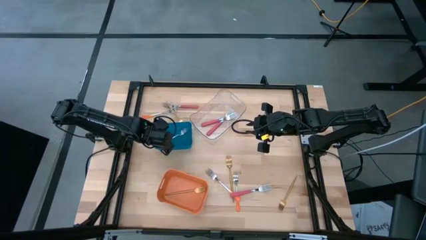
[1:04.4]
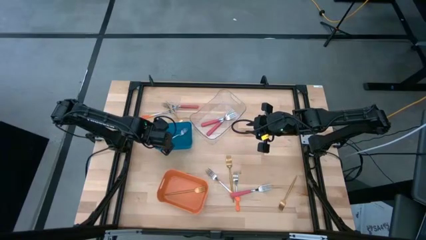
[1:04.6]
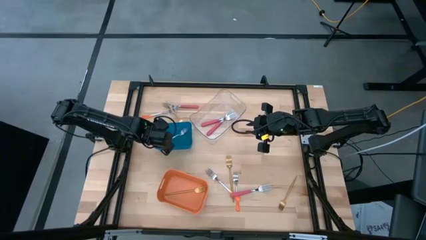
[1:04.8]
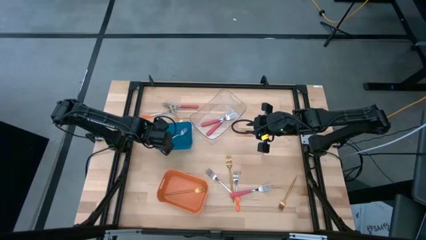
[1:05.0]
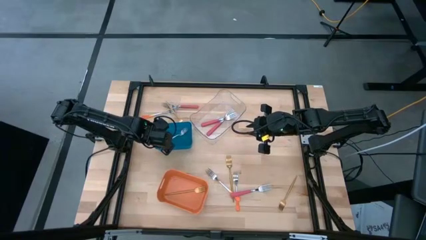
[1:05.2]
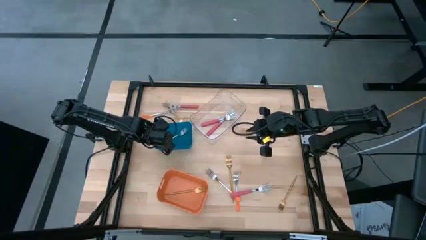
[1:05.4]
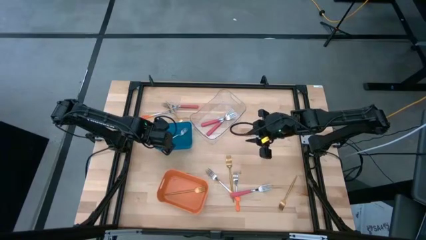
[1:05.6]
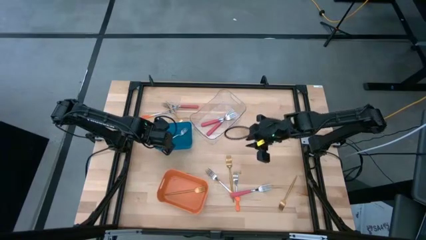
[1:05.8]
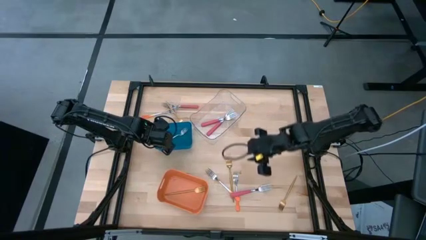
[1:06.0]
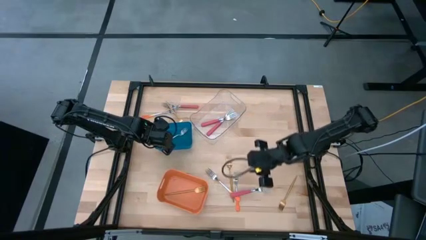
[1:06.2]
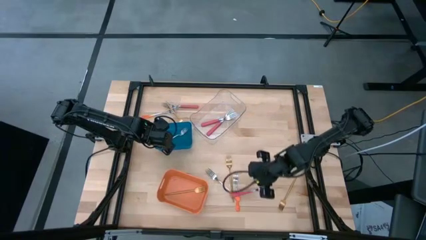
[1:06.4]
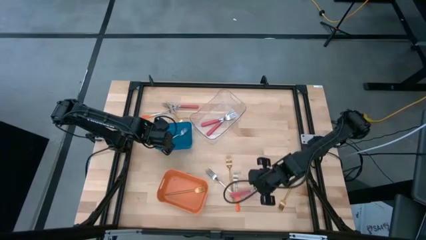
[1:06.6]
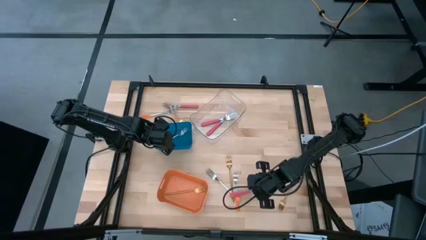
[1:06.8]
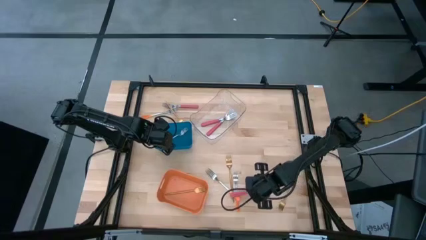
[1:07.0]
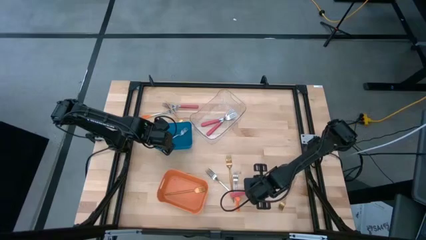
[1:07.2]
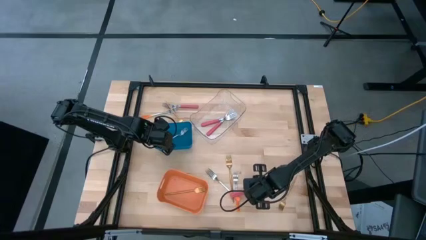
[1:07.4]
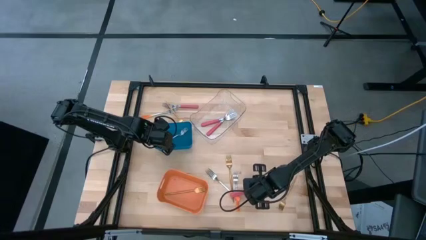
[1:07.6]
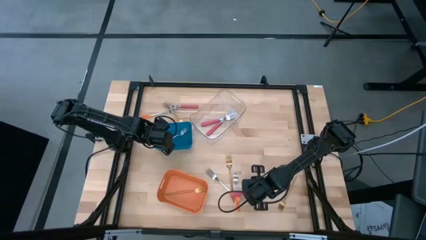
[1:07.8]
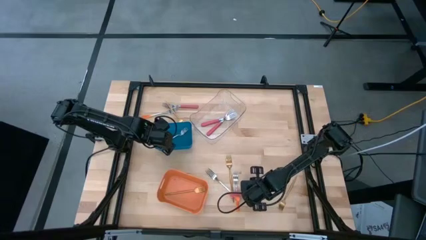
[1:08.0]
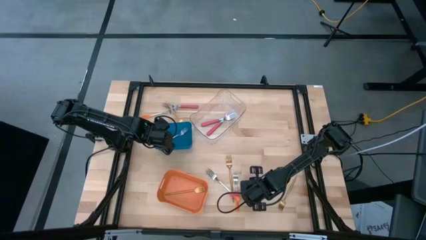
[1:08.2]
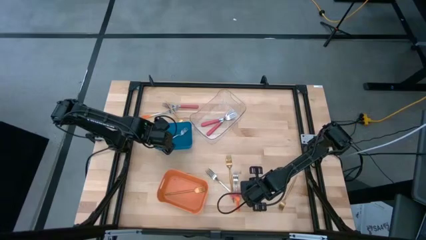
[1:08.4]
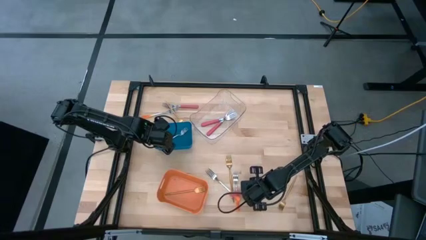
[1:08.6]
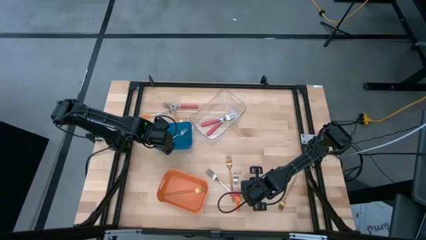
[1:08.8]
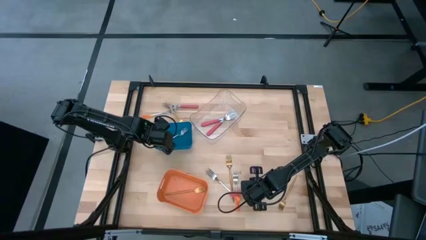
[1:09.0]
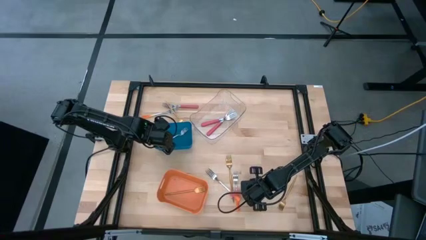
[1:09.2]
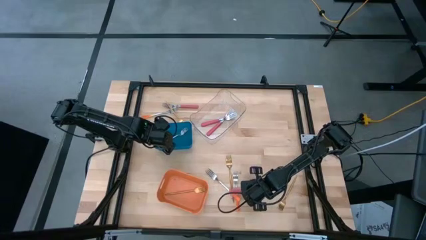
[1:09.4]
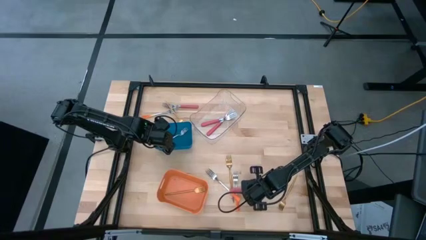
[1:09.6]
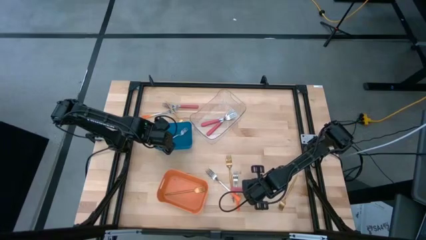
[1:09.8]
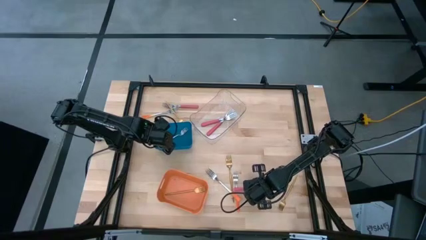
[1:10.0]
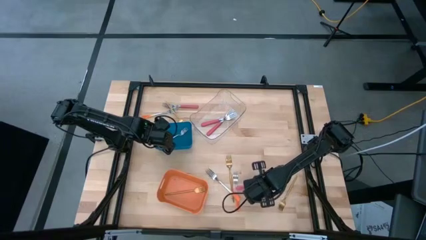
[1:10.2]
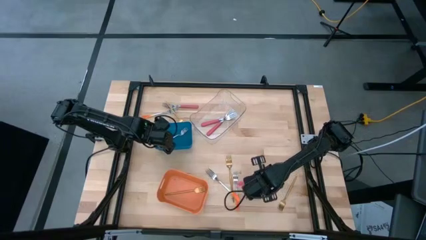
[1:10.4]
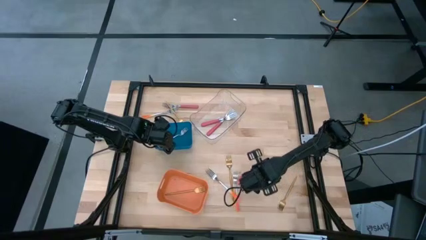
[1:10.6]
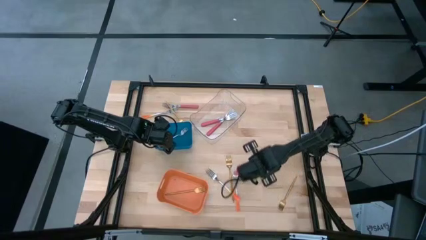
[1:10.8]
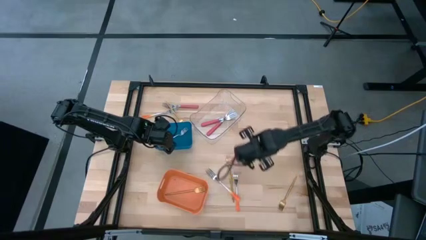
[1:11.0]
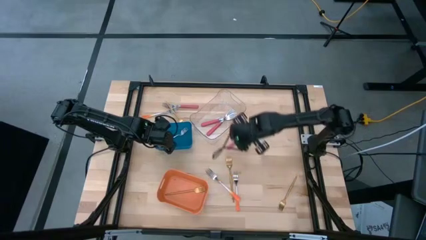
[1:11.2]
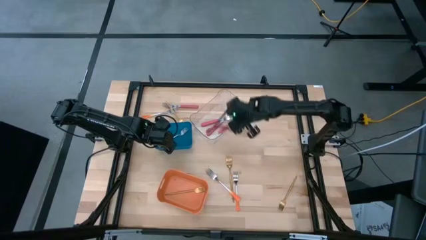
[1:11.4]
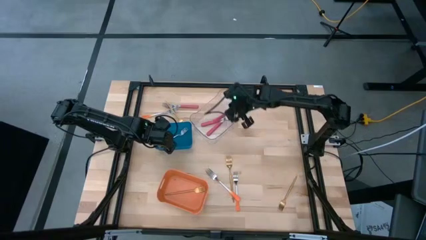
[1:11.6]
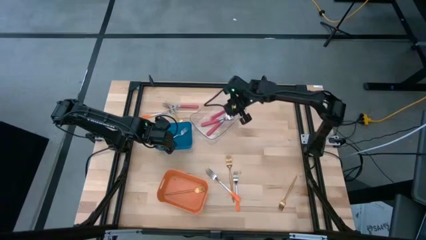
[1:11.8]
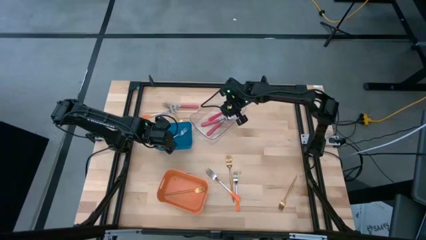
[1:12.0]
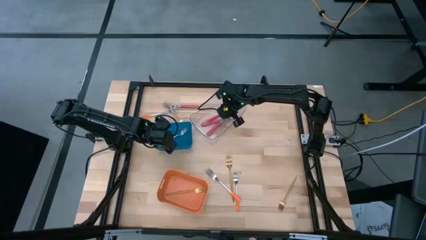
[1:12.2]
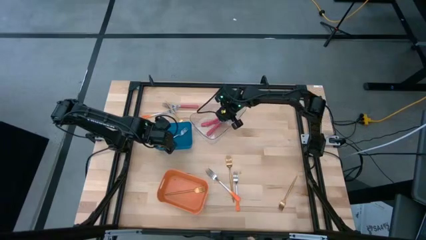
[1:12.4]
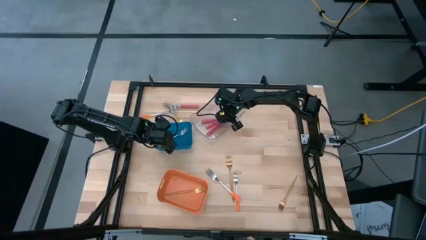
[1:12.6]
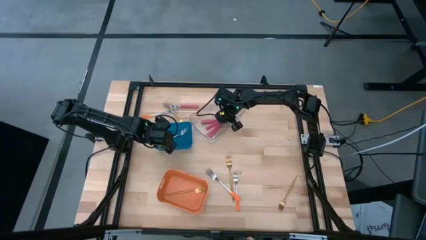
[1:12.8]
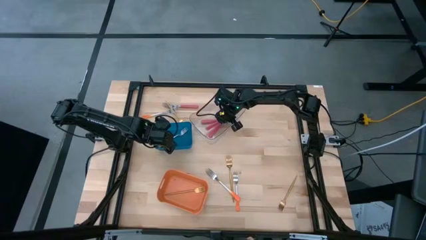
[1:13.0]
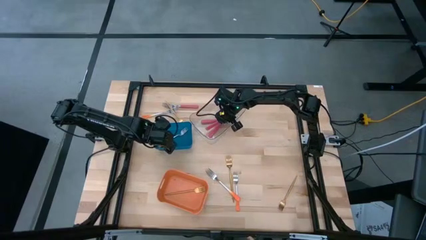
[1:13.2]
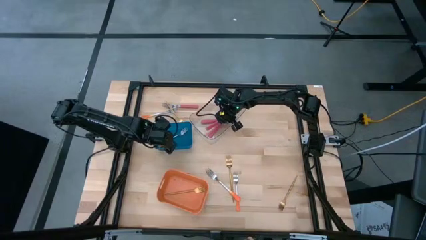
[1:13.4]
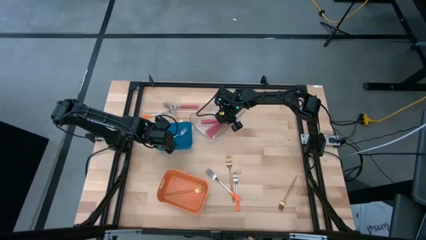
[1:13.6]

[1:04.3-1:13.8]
Task: Sort silverware by color (type)
Put the pink fork into the transparent bin

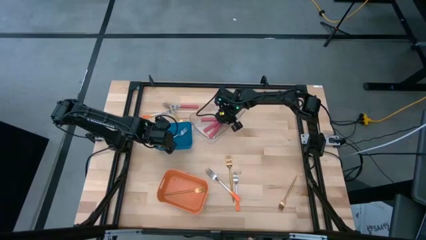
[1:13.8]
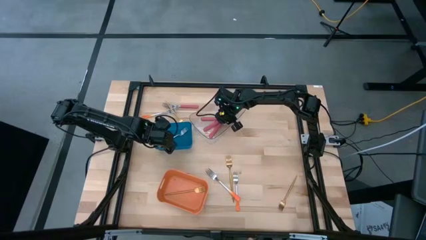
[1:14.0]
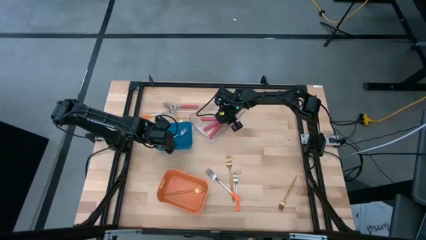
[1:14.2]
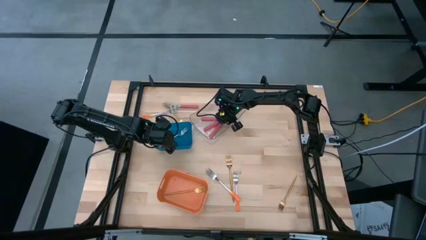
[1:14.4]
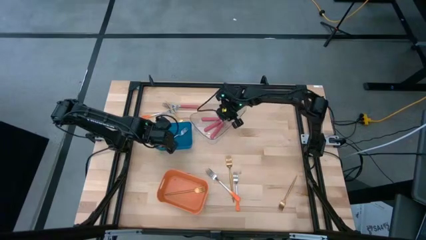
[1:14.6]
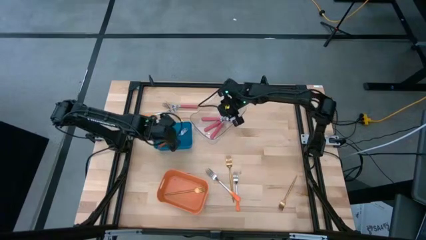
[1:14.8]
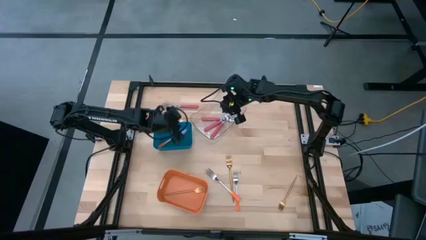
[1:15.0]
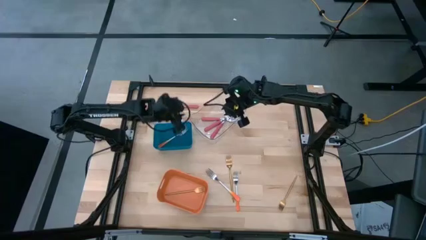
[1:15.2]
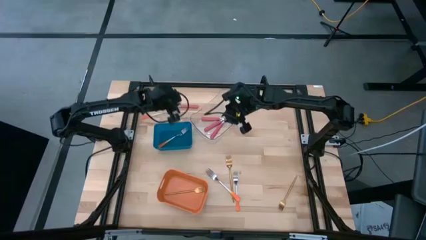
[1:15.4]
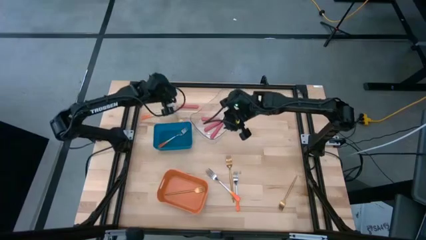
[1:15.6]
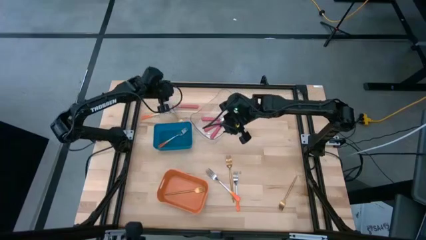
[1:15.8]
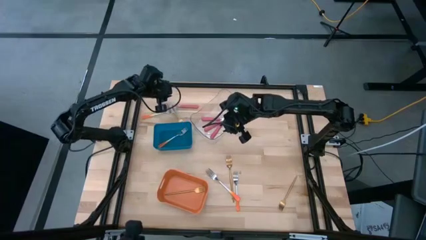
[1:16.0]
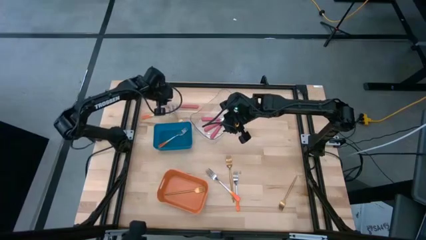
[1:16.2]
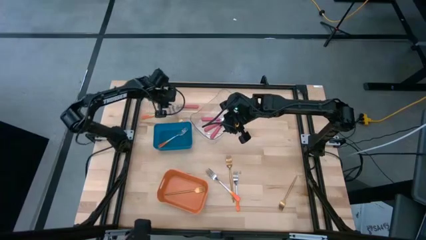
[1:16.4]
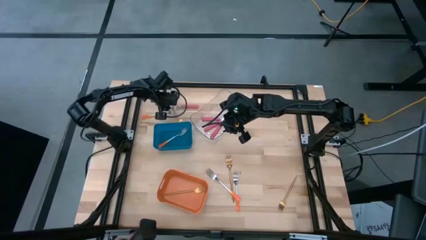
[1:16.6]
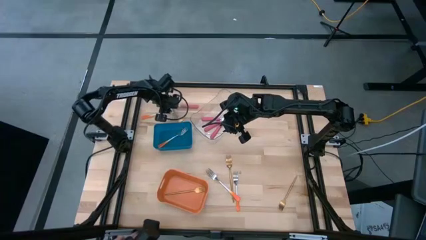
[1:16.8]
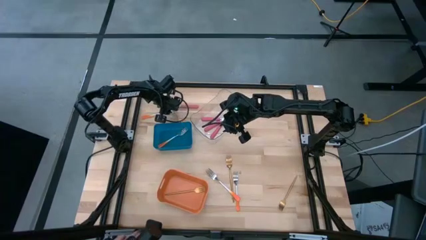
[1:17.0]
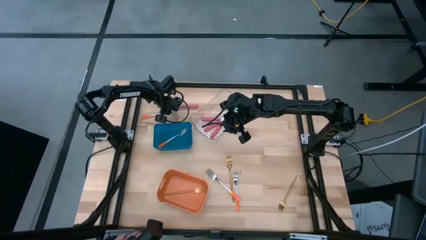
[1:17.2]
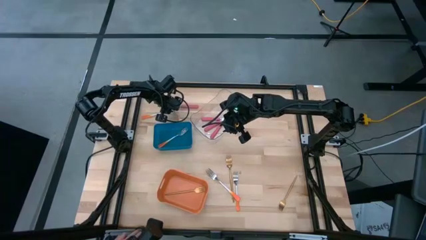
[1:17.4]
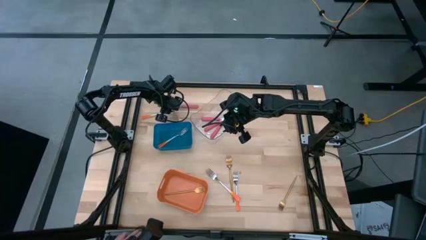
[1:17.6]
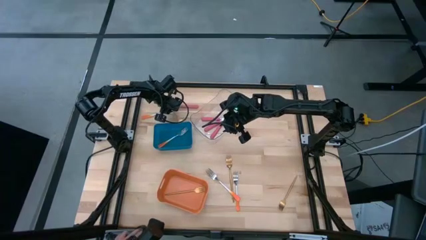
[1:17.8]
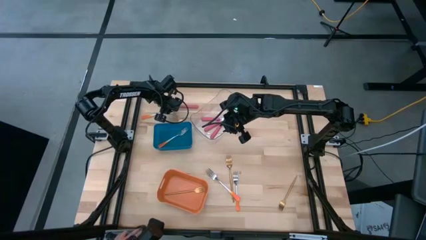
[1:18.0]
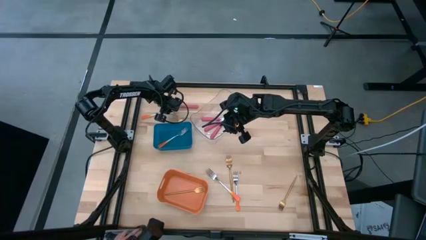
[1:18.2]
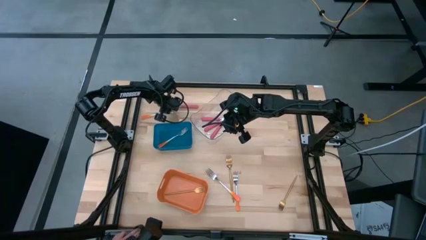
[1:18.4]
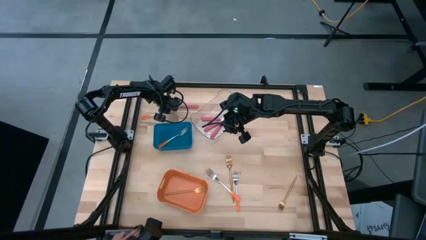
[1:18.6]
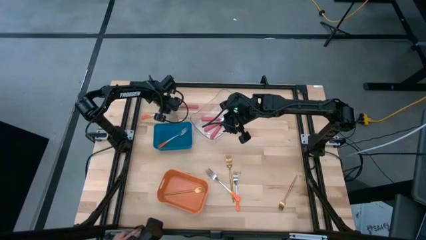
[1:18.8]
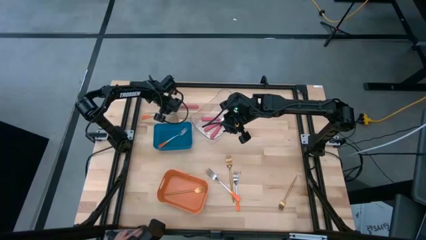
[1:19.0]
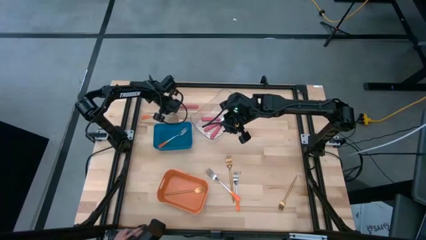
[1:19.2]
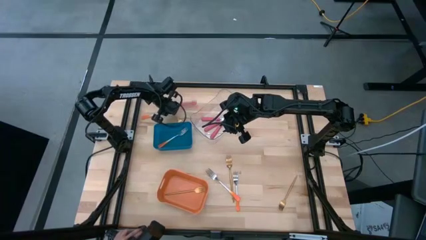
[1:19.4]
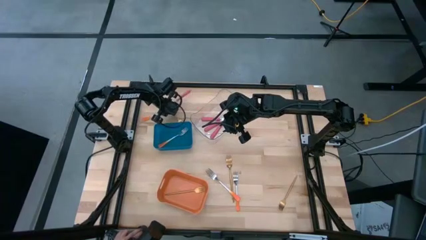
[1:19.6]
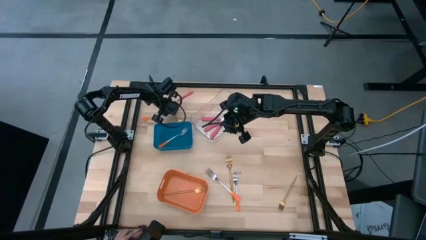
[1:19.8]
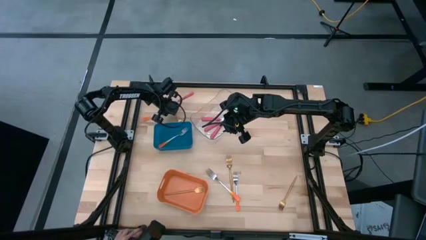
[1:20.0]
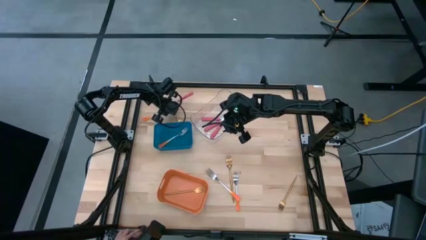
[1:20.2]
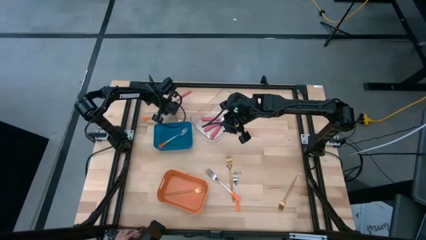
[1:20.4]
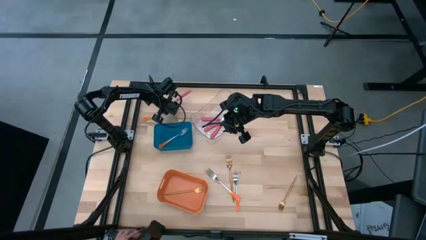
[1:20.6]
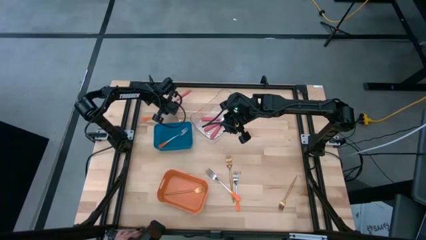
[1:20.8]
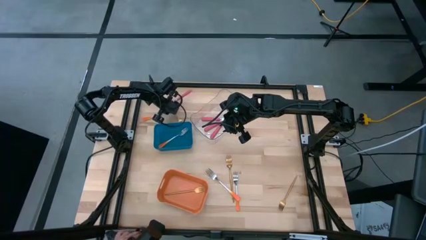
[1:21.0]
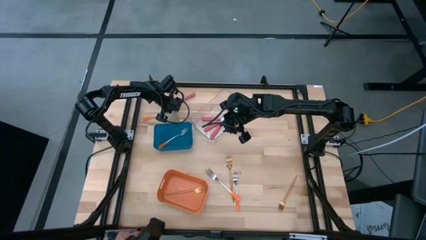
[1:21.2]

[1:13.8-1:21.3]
Put the gold fork into the orange bin
